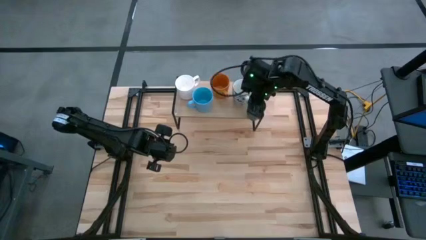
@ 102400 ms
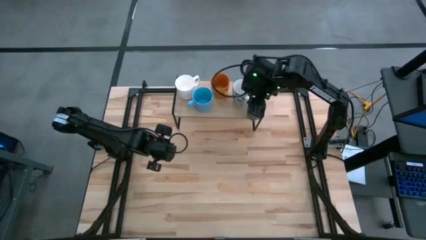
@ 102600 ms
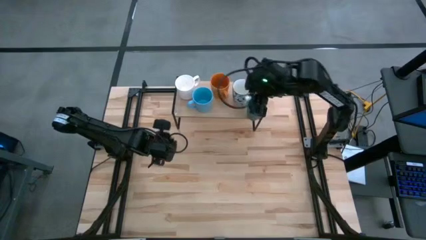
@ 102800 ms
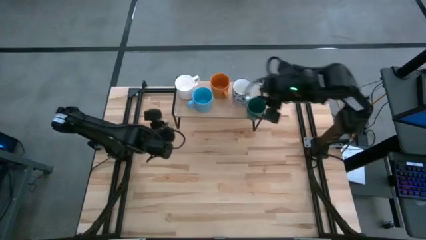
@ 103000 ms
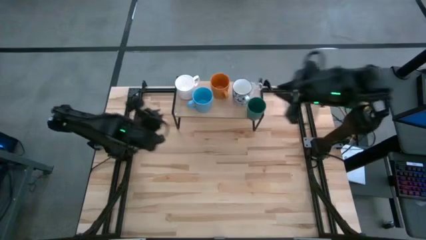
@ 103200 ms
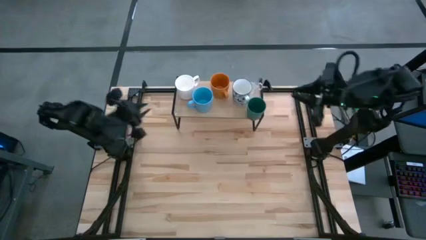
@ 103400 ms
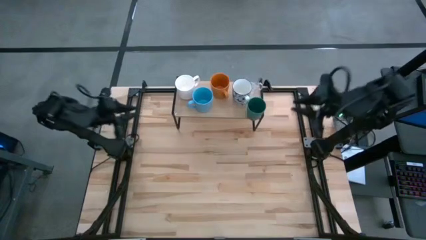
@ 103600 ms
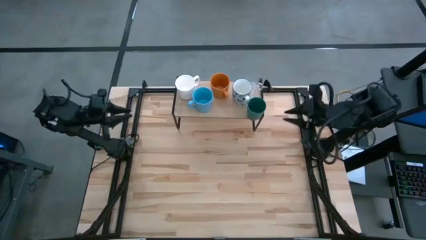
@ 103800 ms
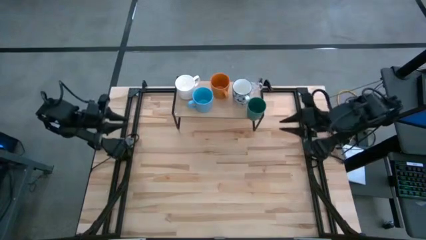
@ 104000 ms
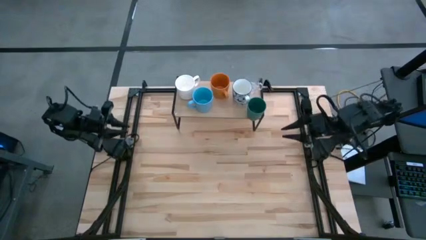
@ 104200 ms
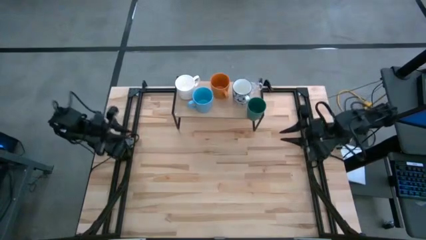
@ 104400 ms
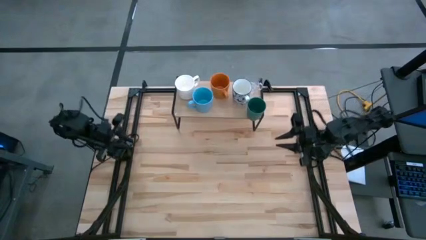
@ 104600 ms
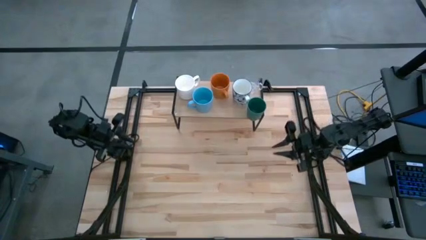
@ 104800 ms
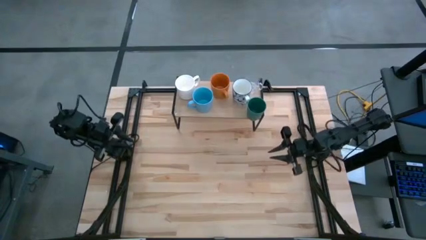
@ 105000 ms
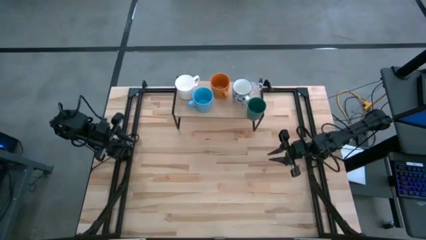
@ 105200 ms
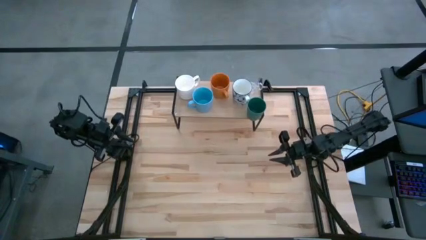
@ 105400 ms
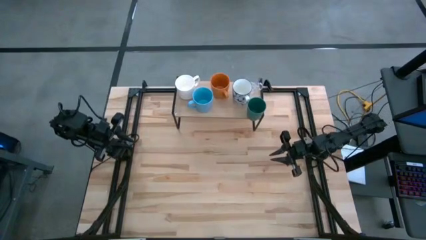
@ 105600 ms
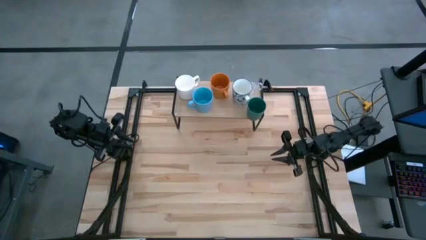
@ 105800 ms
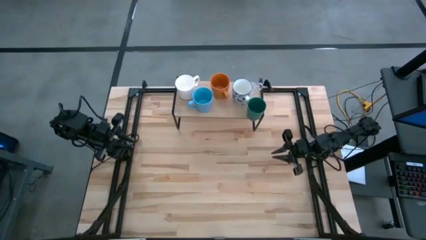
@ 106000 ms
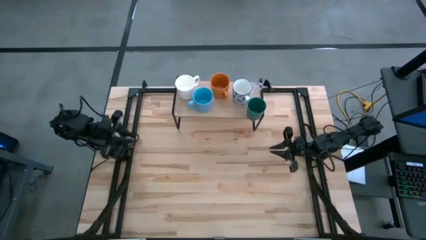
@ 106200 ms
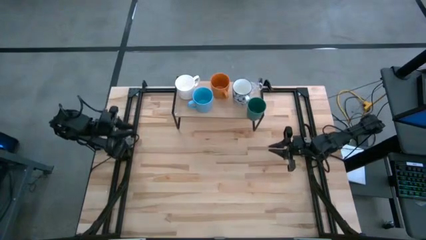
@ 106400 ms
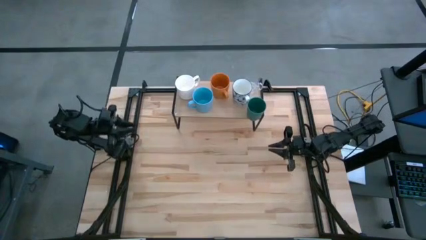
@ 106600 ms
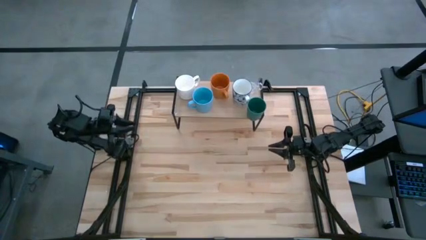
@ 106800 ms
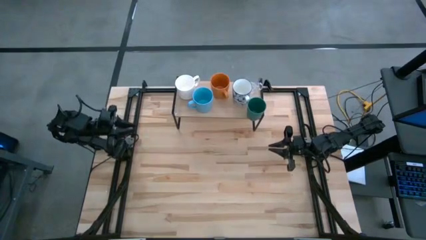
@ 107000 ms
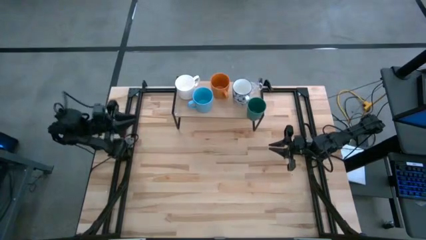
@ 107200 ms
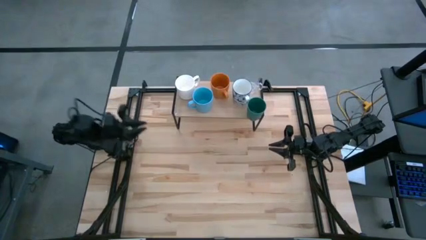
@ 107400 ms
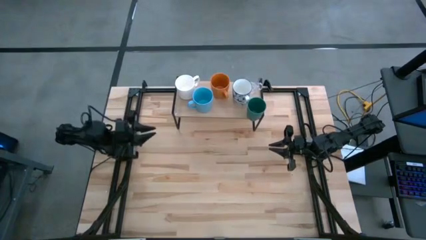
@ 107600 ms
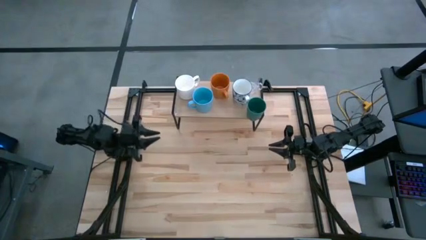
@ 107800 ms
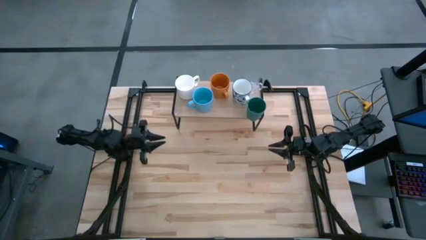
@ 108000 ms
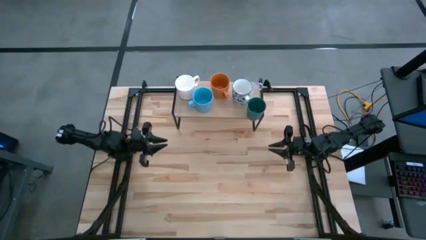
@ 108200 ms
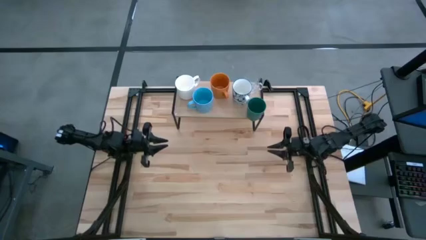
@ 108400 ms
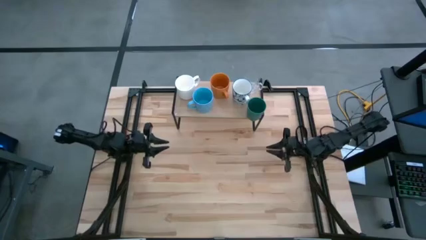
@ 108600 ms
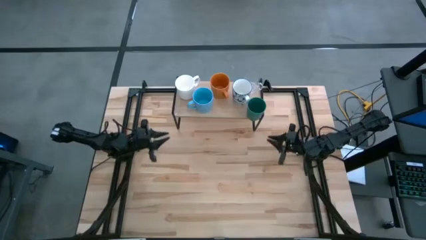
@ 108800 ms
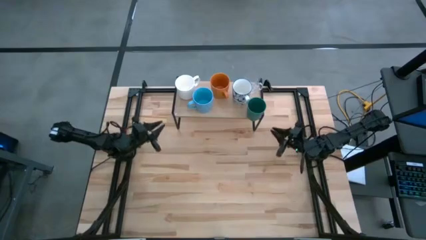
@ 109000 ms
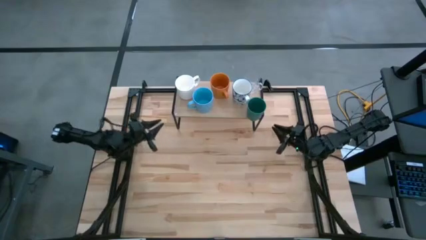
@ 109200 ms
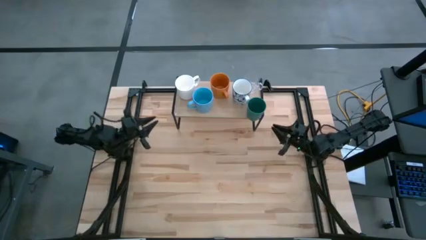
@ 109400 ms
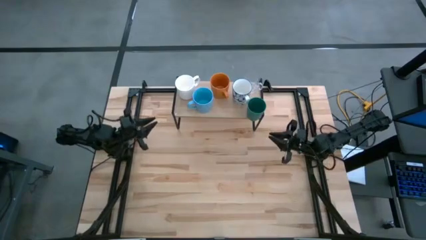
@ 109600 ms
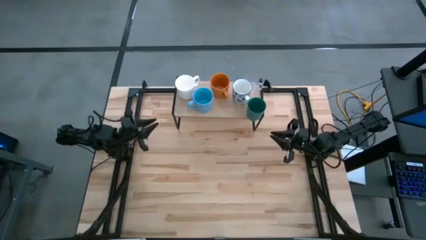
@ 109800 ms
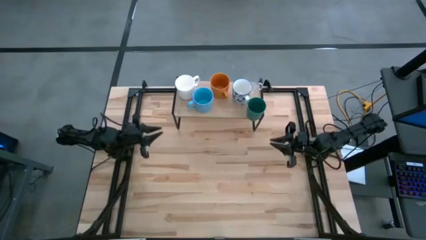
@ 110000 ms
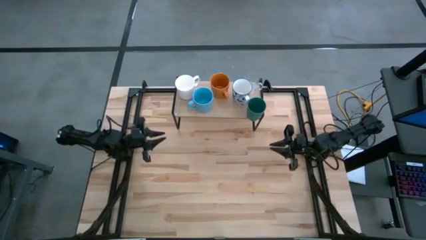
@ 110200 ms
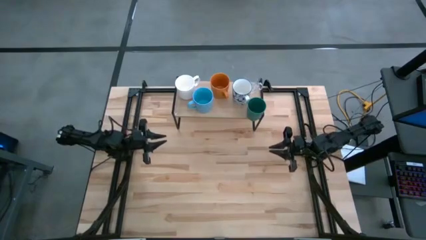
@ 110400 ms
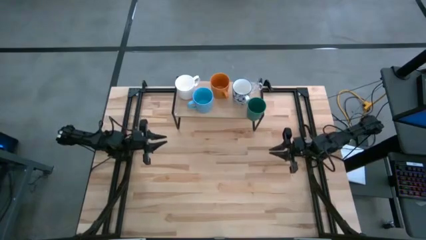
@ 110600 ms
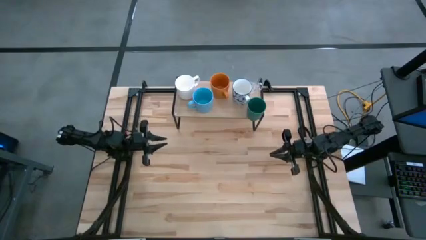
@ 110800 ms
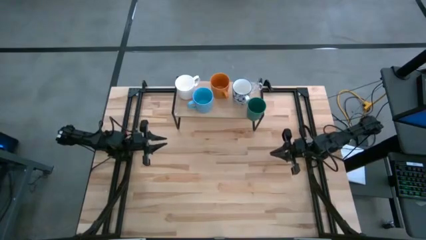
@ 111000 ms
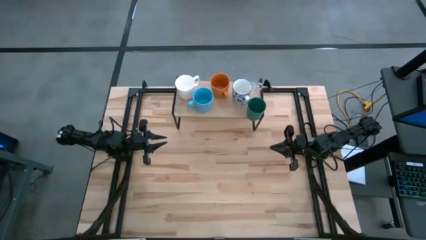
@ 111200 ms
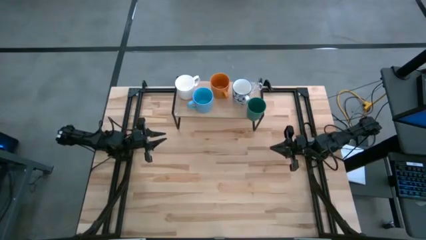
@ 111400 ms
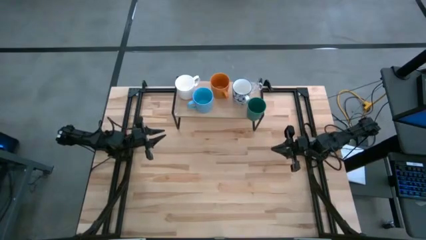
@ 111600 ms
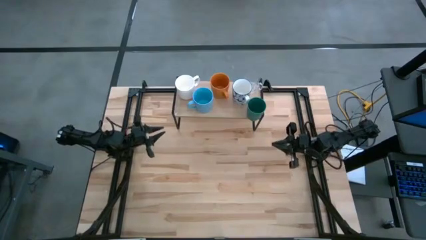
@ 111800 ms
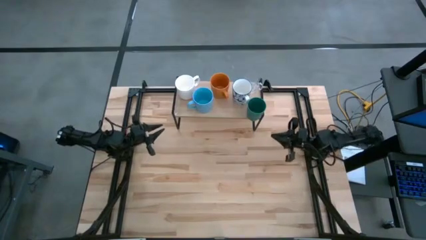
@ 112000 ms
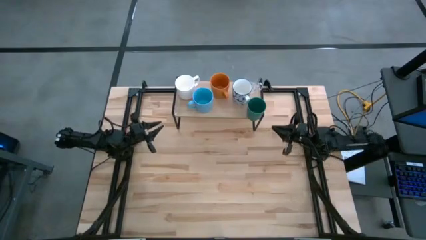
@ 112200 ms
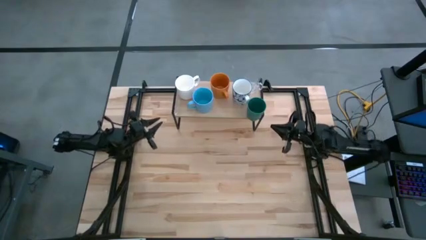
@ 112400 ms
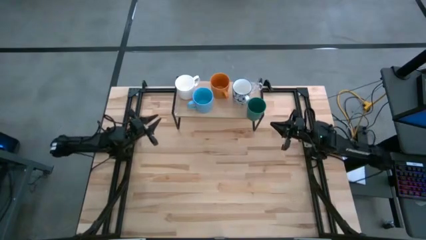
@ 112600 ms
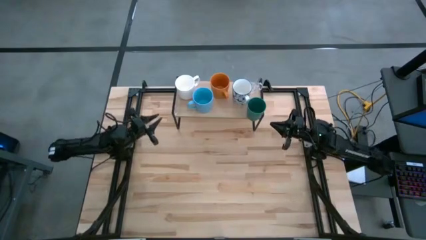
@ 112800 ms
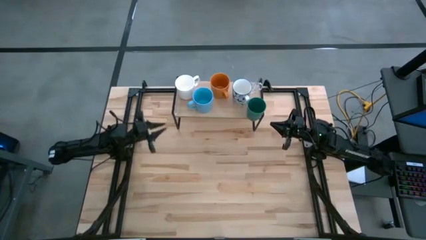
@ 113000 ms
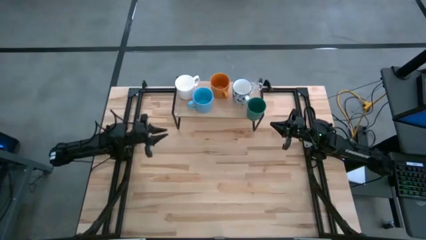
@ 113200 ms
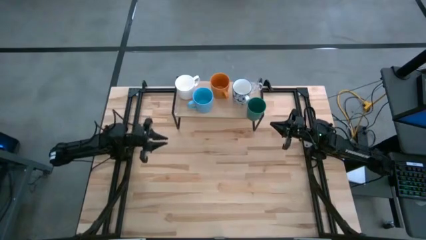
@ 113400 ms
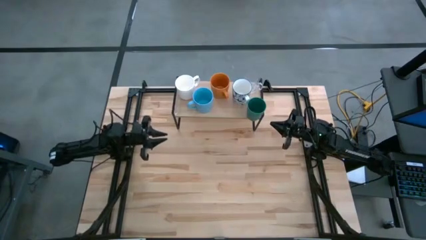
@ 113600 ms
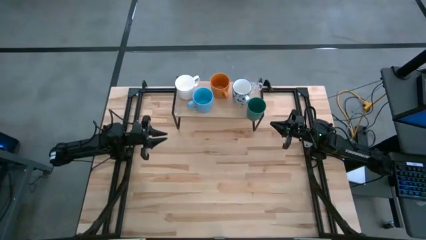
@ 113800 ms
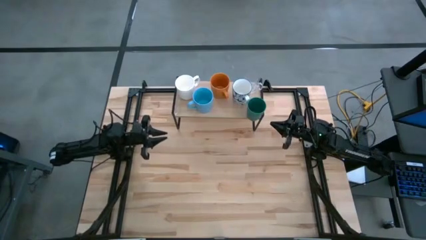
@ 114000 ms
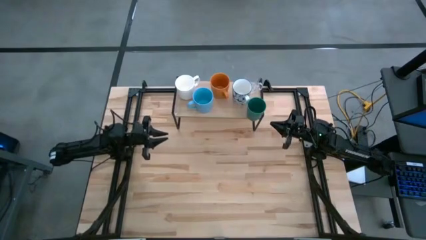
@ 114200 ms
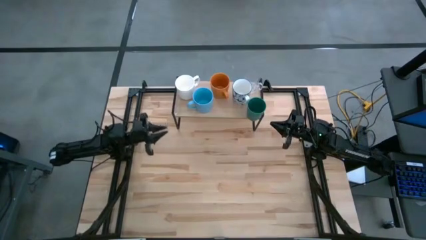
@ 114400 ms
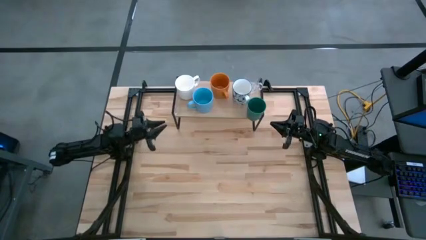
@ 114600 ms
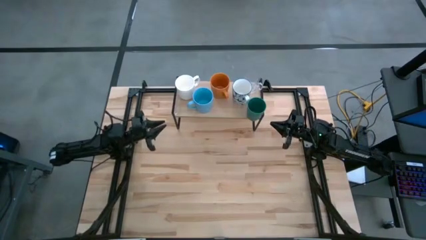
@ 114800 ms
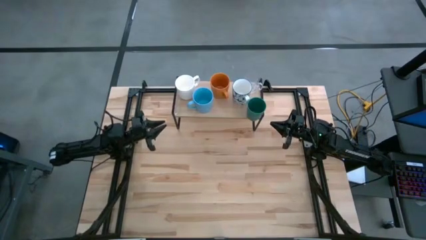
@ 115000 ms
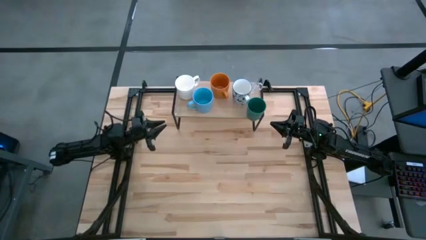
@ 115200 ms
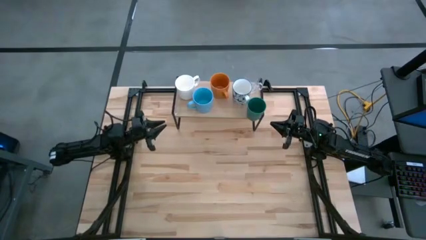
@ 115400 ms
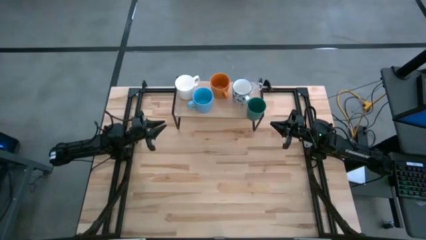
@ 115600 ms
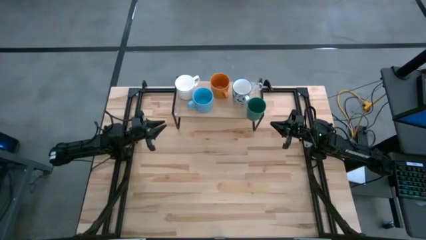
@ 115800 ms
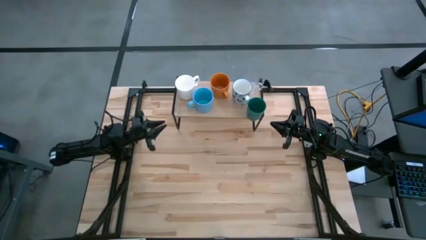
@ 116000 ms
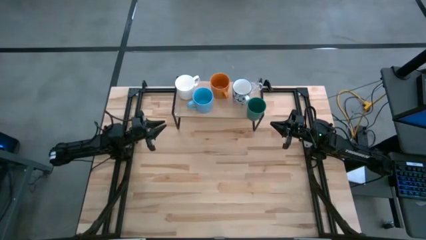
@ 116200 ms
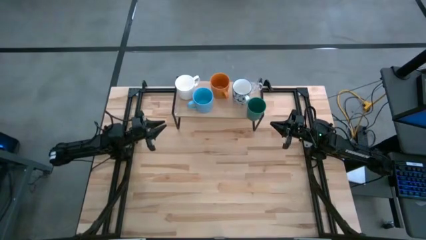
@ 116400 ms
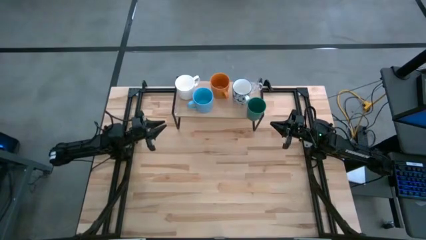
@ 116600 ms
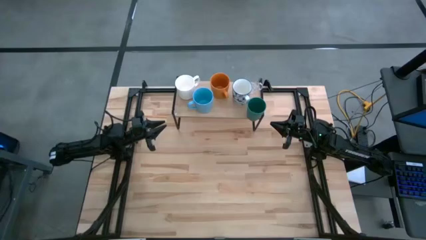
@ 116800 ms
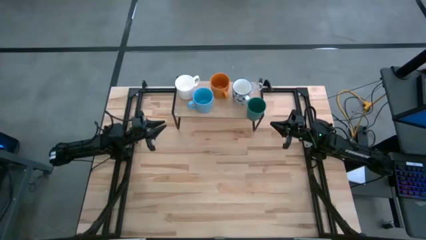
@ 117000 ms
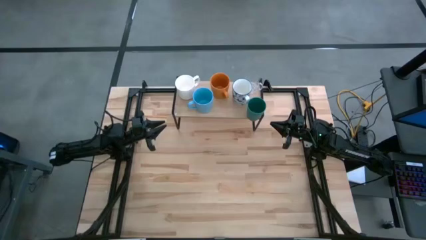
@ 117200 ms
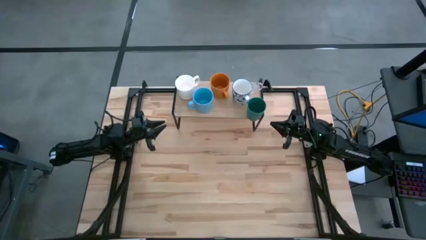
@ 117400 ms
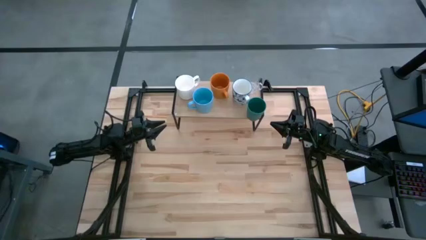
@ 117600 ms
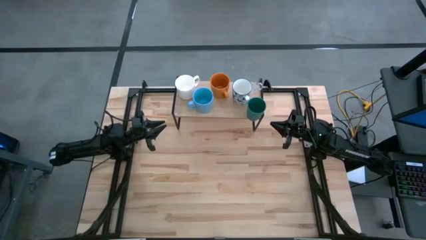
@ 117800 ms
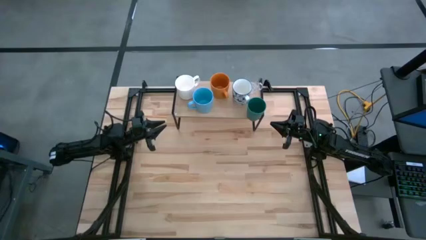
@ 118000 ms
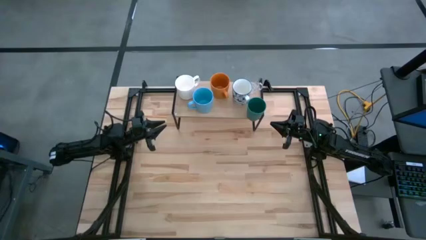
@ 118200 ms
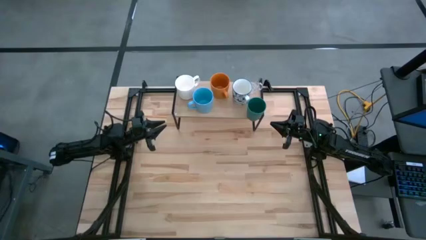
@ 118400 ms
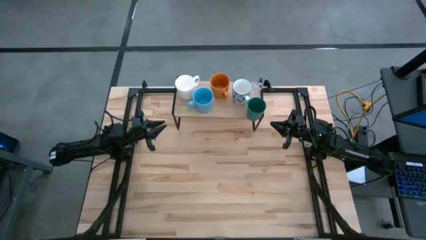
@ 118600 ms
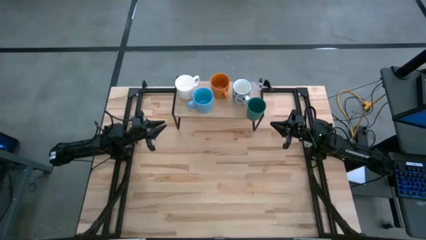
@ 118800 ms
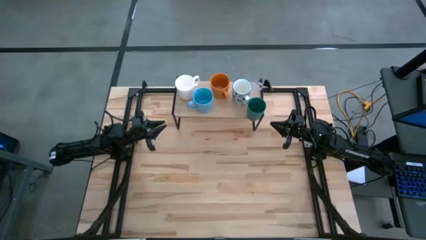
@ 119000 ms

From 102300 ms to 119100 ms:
Task: Stack small to large cups/mugs on shelf
Return to Home Position
